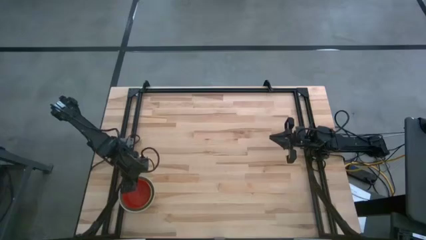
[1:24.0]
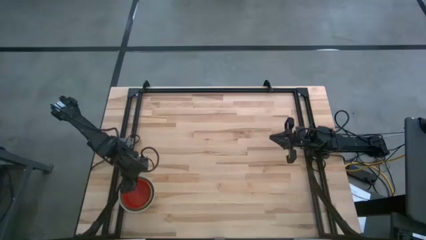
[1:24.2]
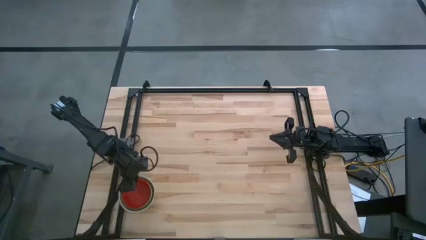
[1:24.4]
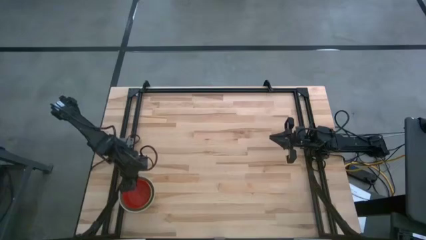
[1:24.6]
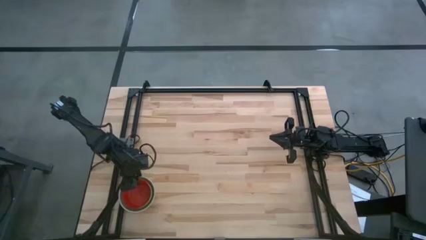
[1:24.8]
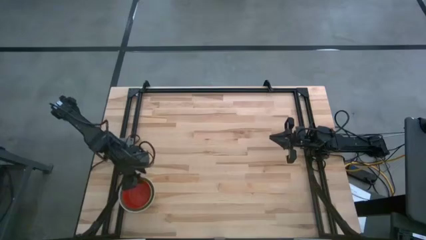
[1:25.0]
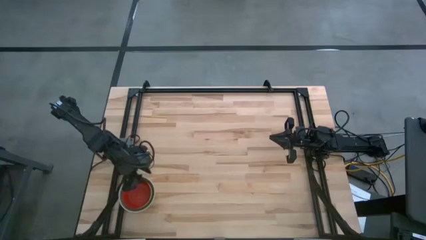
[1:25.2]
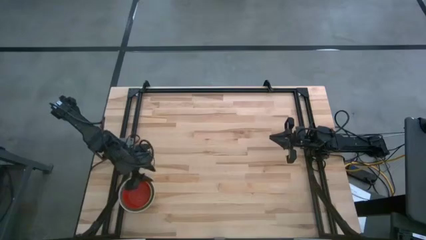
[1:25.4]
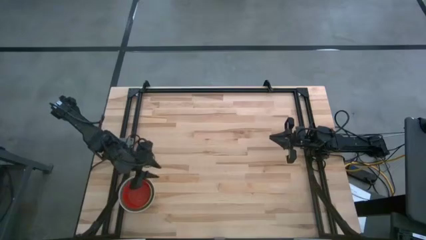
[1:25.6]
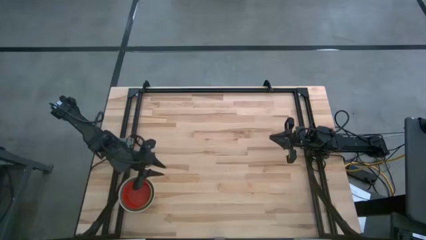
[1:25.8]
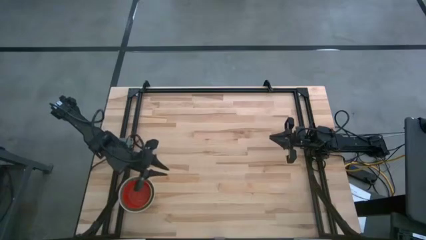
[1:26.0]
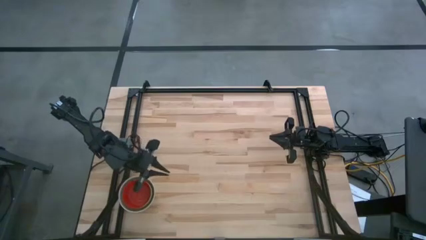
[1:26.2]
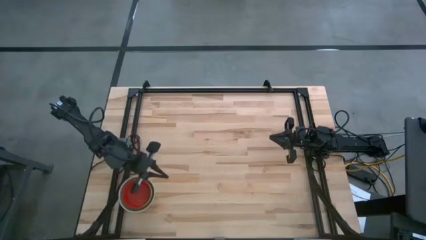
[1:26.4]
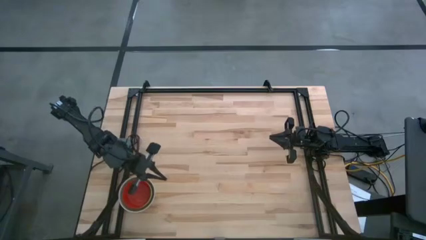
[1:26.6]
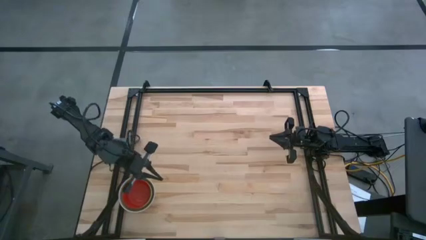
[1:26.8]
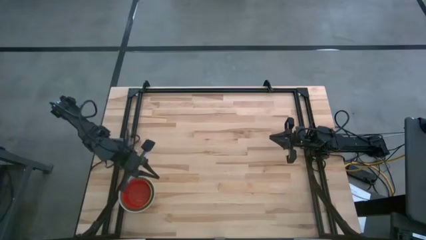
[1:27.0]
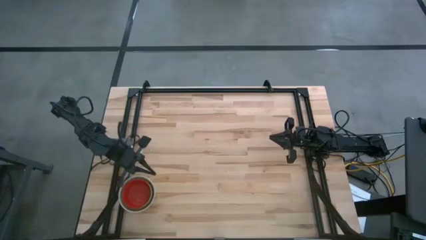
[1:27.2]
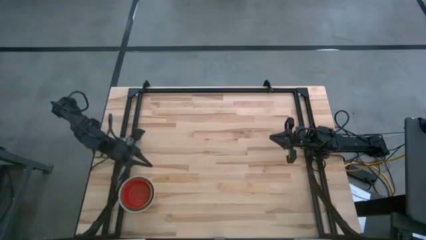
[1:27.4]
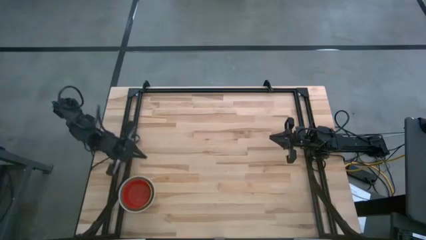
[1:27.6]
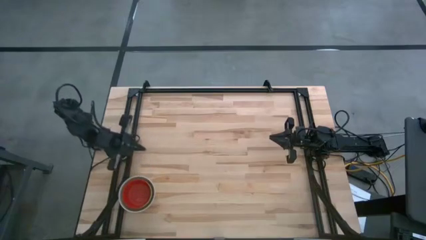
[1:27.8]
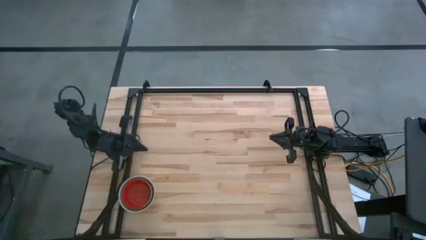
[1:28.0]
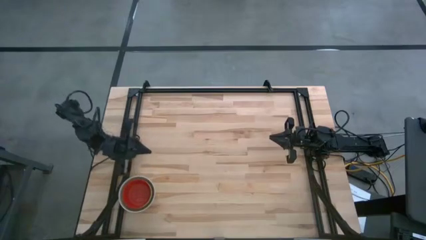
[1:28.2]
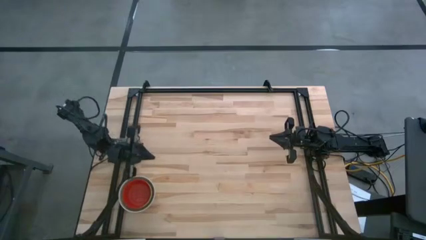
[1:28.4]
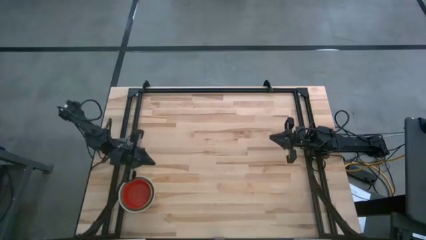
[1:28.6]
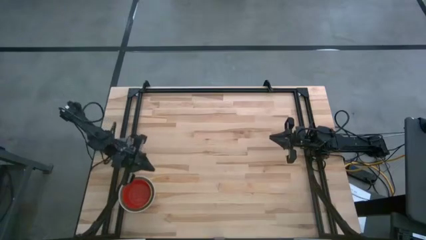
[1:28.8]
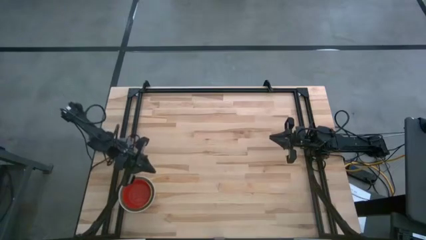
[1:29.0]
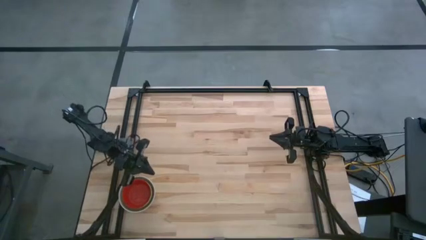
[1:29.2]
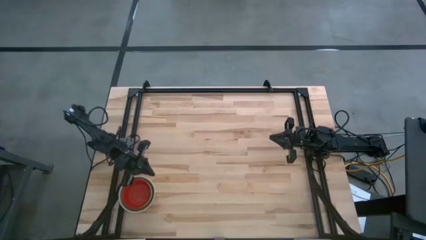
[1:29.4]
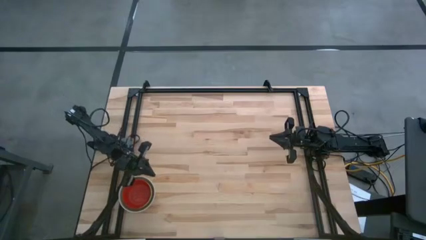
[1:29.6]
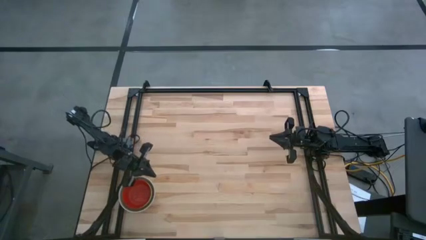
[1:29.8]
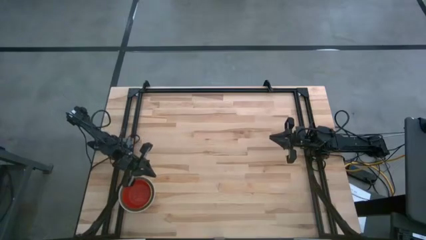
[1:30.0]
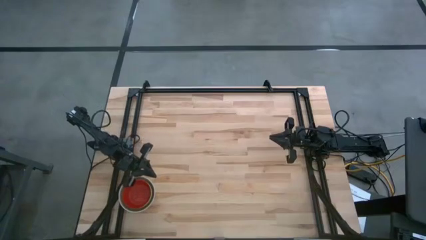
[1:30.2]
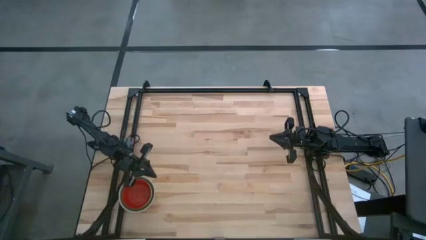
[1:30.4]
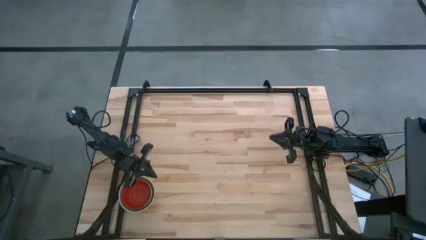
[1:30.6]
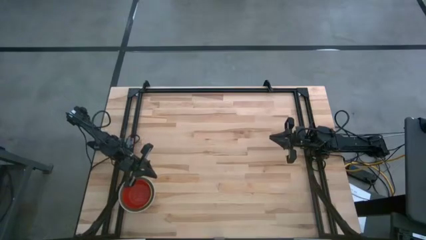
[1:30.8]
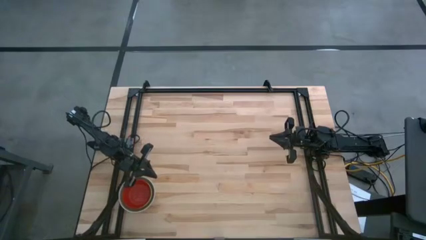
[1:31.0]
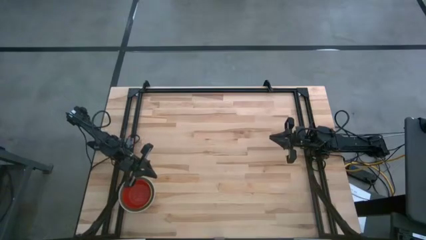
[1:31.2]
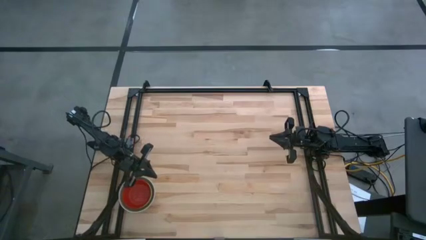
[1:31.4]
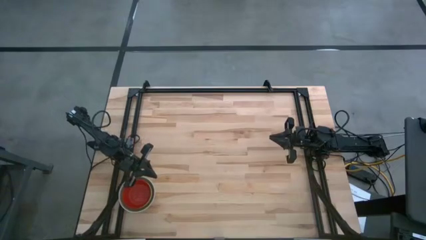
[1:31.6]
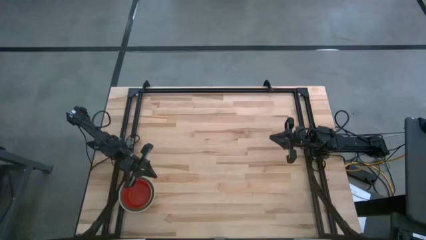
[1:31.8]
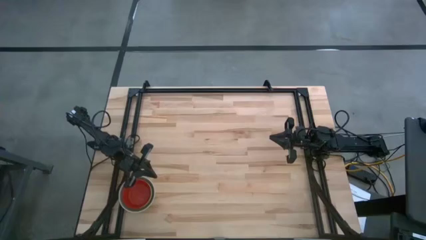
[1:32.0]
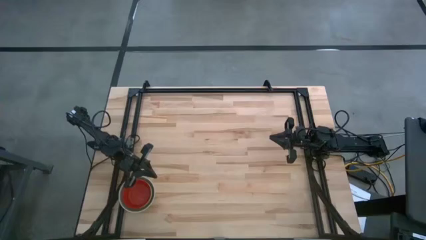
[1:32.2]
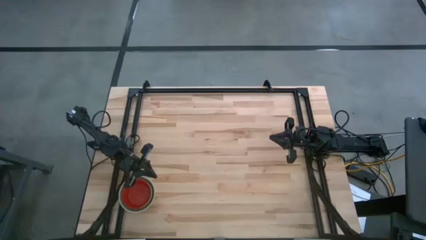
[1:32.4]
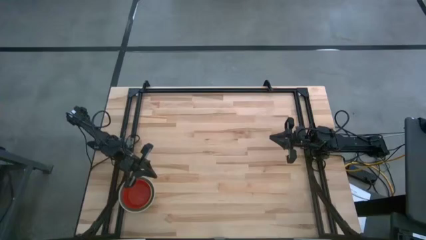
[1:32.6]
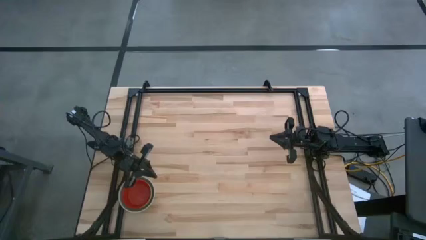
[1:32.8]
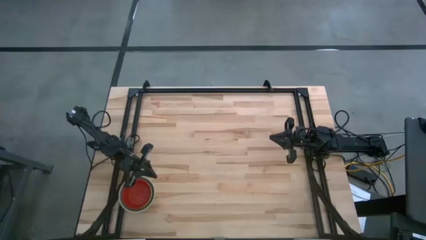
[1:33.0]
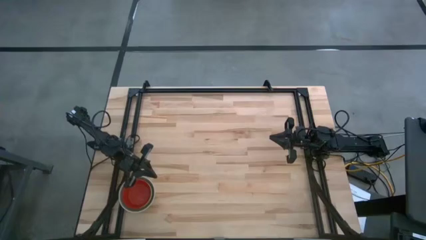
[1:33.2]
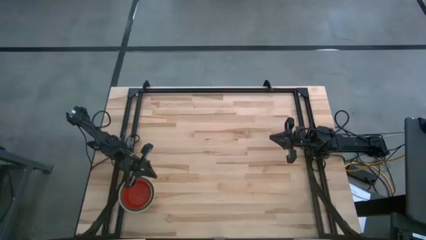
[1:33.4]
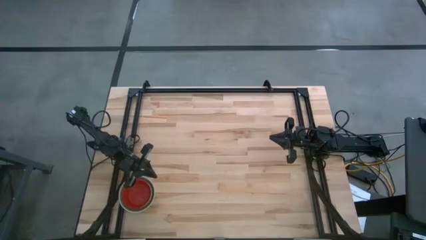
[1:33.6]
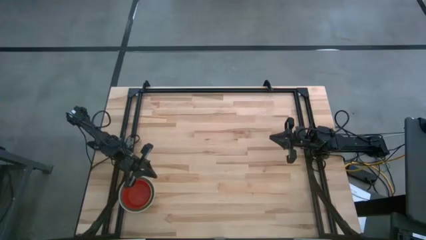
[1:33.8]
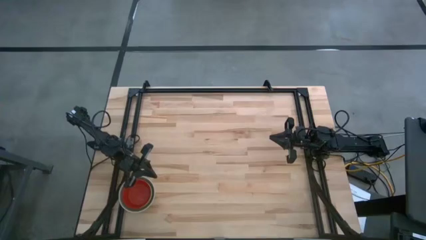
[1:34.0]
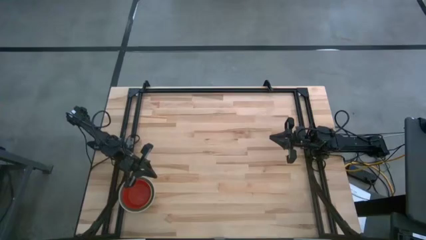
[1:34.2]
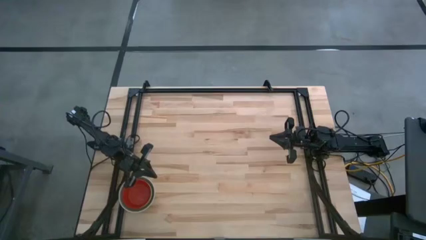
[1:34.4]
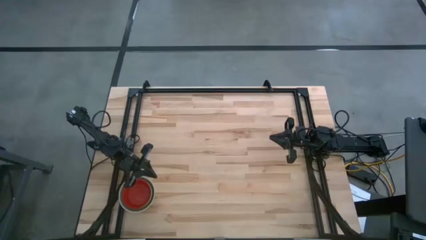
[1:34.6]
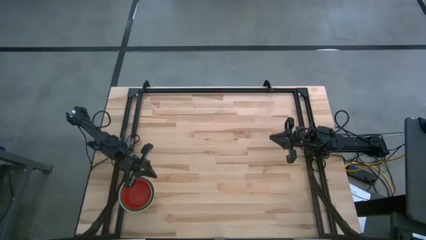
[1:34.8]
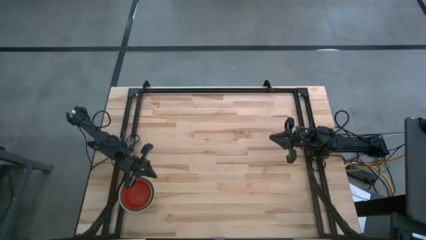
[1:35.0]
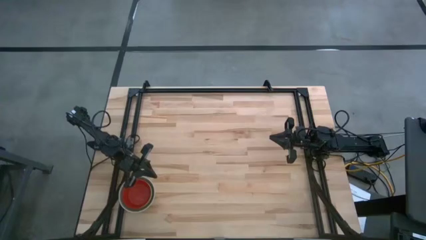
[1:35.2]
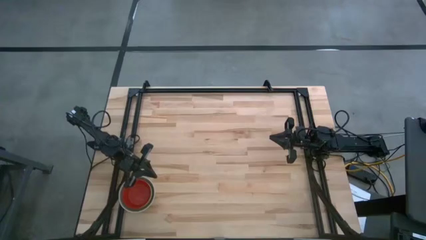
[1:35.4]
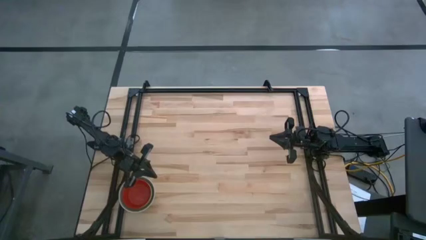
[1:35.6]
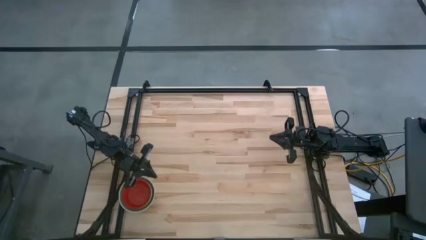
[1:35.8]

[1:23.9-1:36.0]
Return to Home Position
